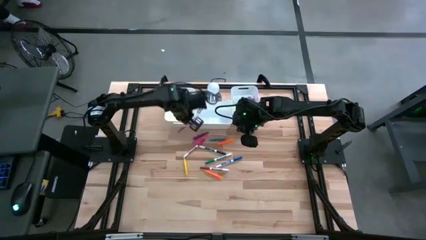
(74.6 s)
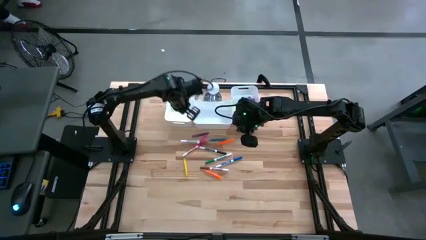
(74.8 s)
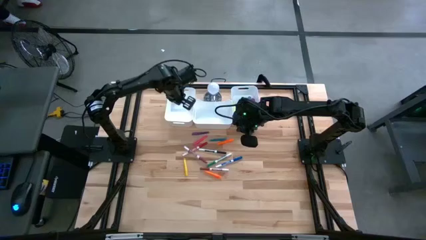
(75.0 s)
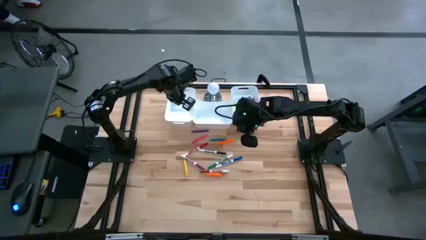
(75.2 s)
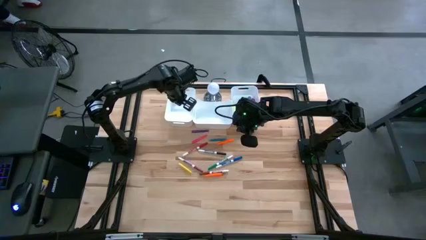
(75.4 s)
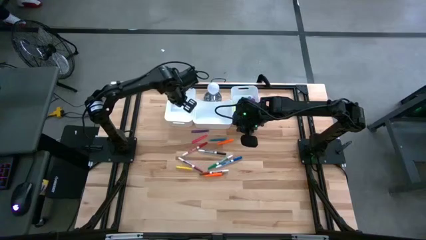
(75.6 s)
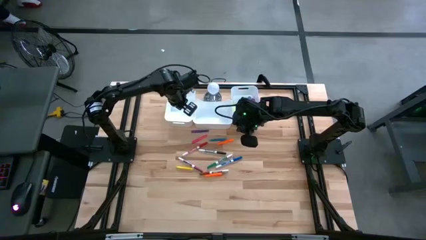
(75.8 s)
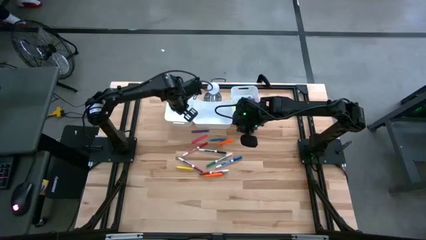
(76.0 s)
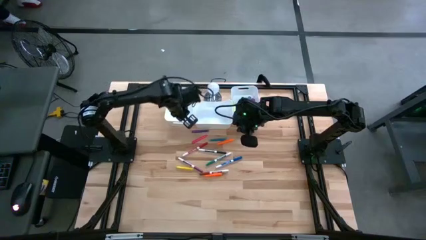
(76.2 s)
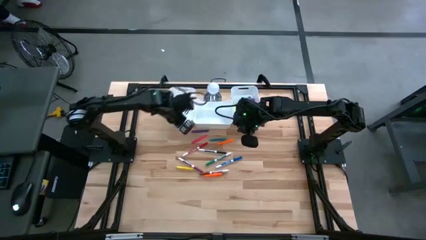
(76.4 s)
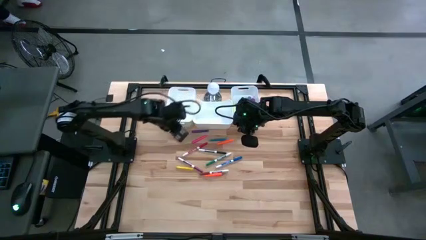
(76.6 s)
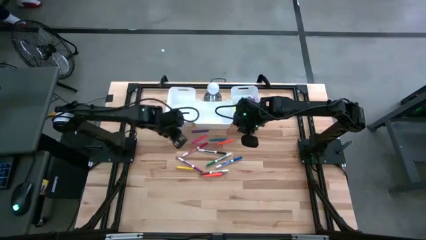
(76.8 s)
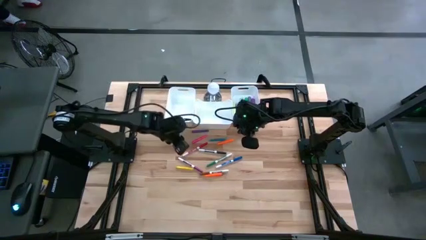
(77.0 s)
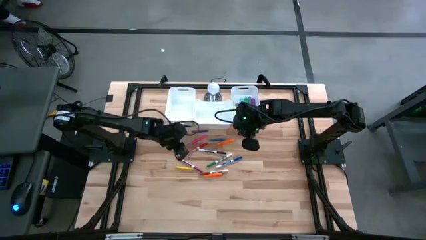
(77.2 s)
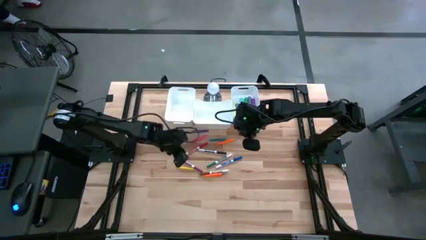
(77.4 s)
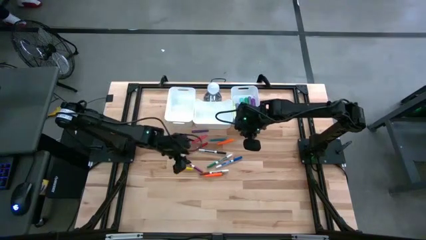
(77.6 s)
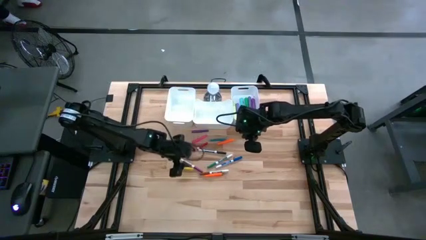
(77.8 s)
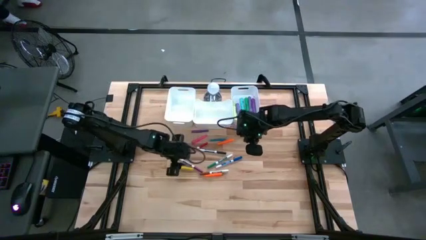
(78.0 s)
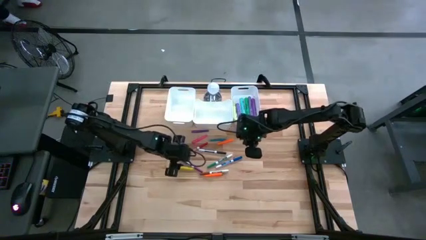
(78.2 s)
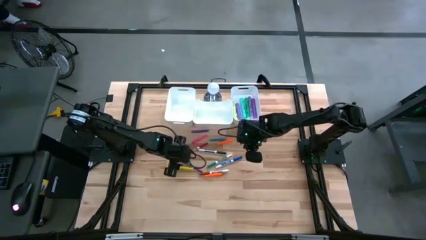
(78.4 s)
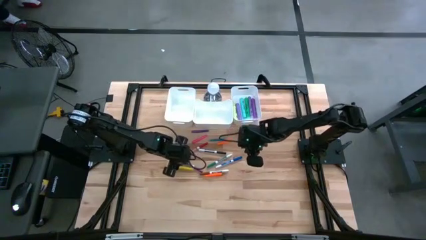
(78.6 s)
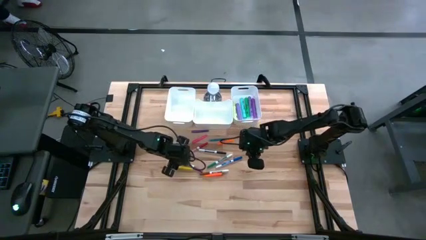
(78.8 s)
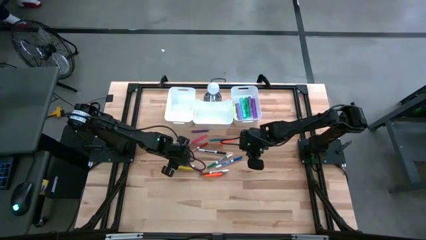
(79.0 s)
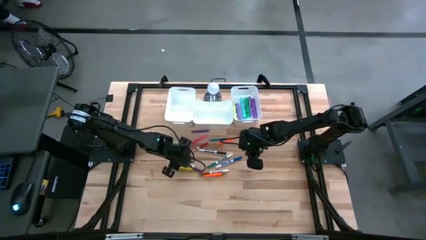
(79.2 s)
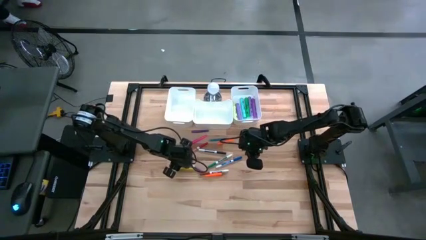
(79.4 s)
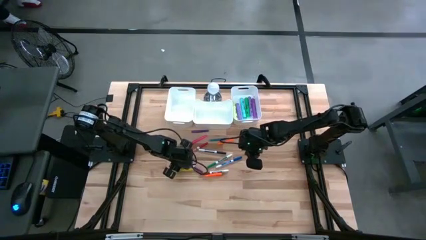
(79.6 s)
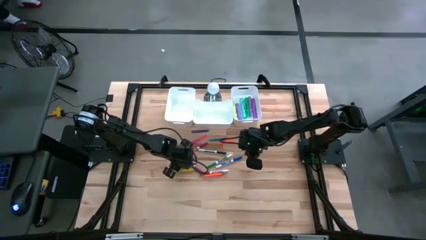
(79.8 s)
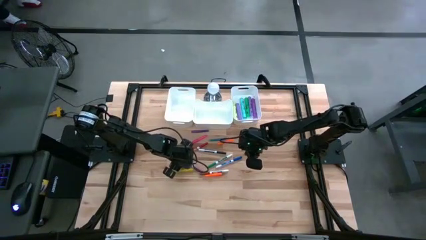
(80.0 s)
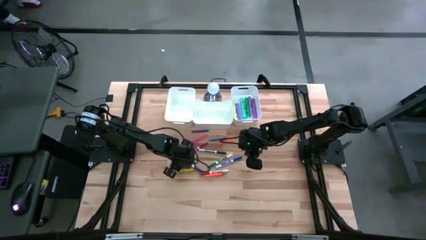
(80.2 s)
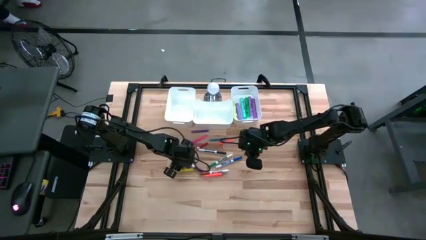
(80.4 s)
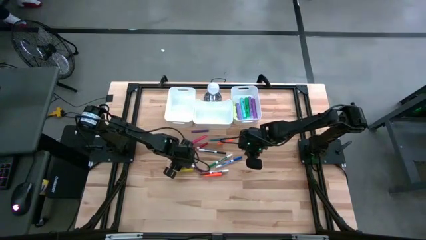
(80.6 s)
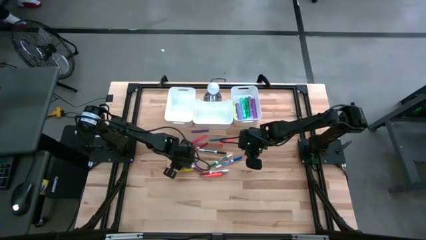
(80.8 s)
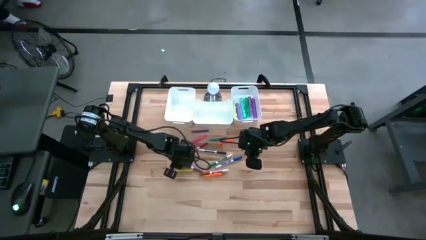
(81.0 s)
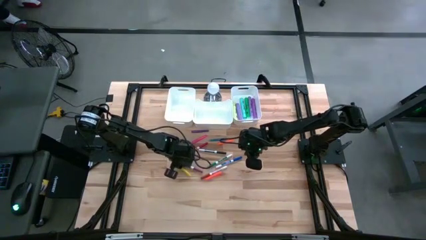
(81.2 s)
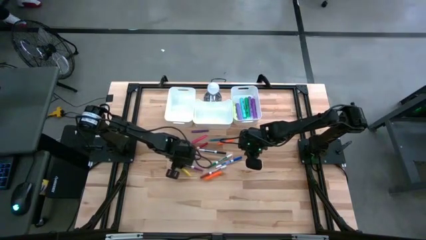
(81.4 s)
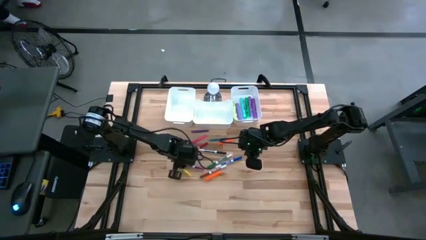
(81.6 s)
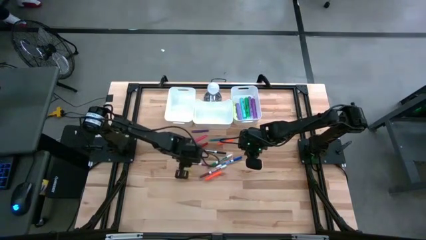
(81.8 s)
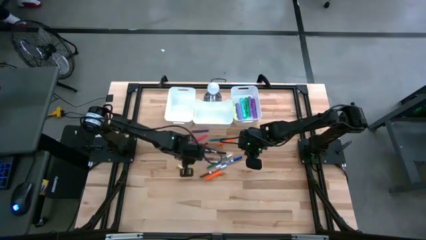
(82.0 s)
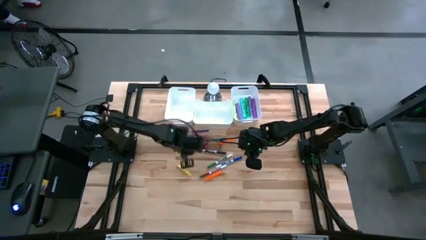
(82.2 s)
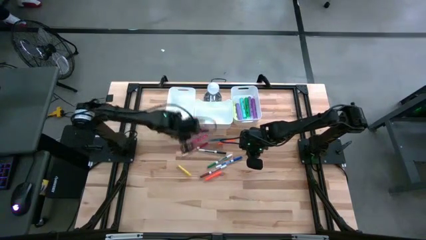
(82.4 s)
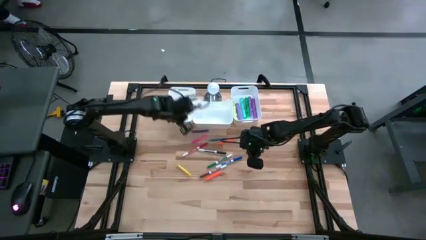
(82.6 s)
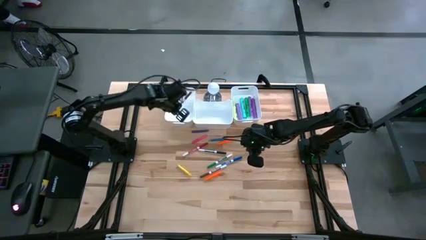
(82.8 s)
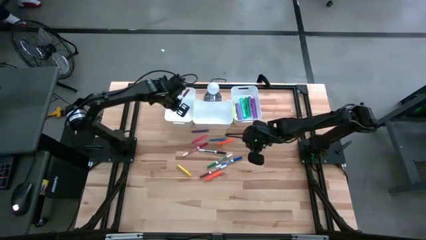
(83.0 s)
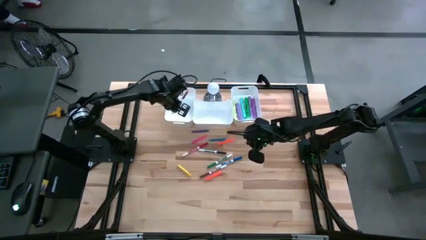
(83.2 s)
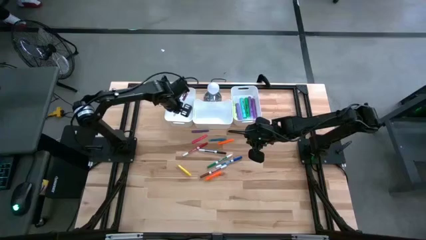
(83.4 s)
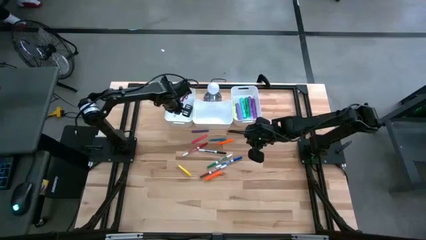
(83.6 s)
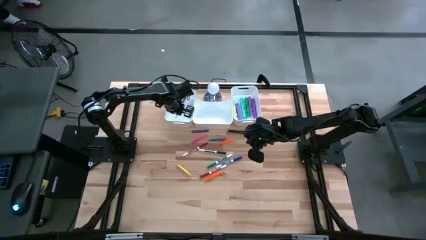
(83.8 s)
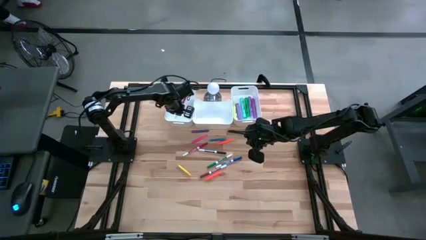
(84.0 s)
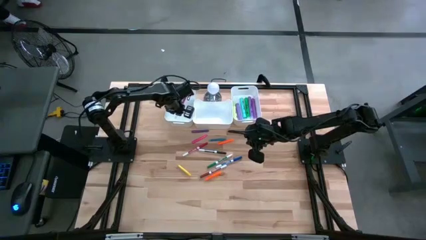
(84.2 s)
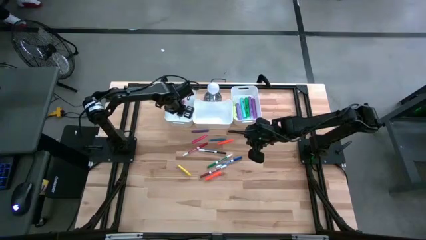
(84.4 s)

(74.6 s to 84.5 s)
Task: Pick & Place Markers
Put the violet marker pen into the left white bin

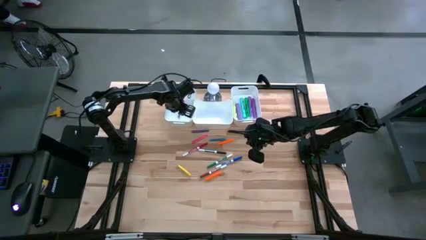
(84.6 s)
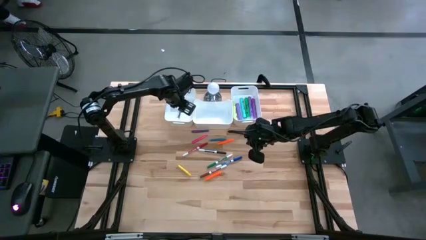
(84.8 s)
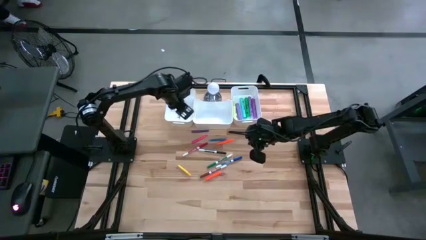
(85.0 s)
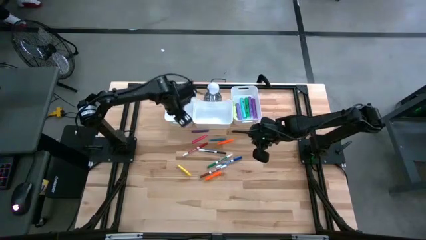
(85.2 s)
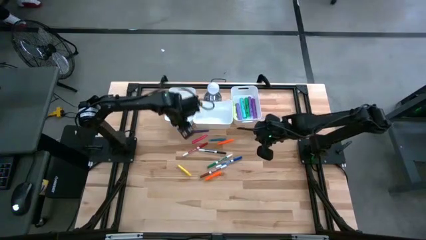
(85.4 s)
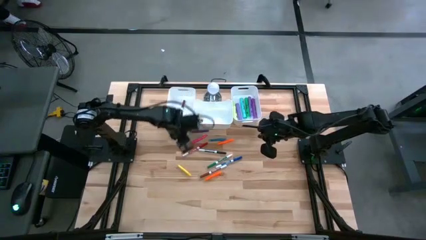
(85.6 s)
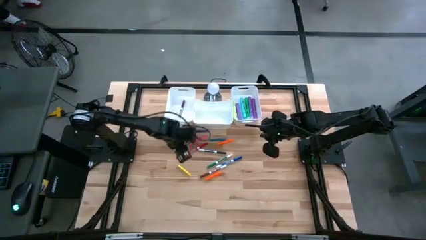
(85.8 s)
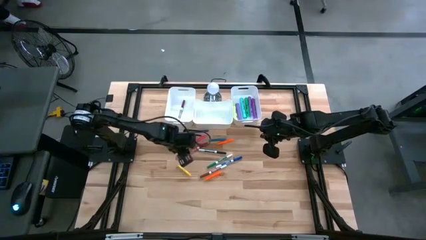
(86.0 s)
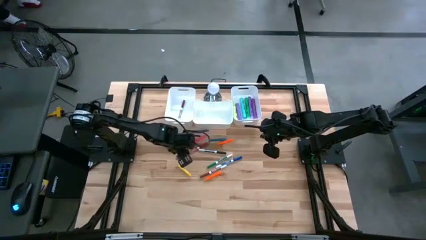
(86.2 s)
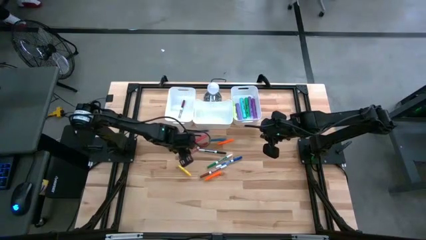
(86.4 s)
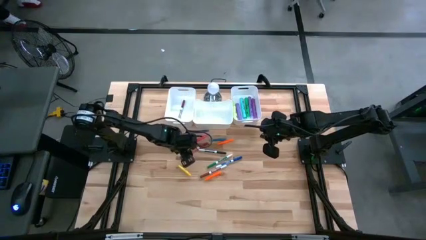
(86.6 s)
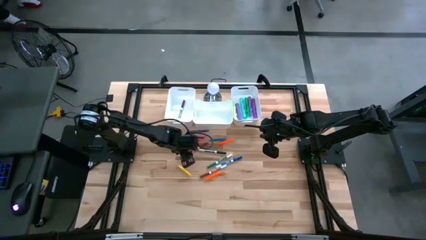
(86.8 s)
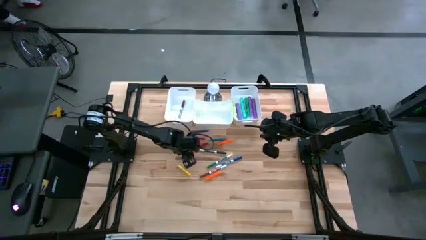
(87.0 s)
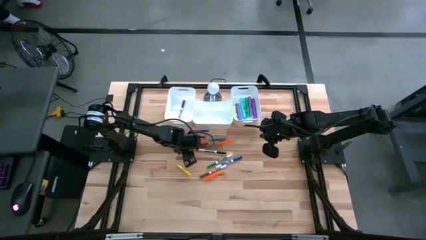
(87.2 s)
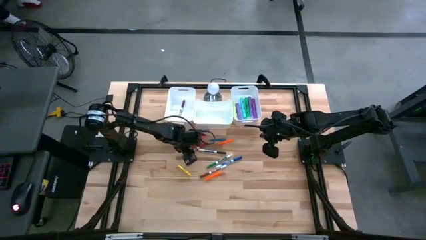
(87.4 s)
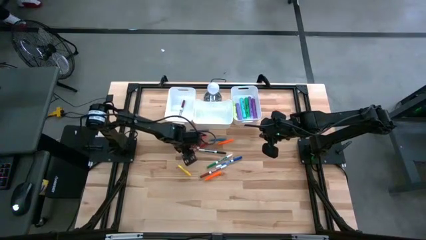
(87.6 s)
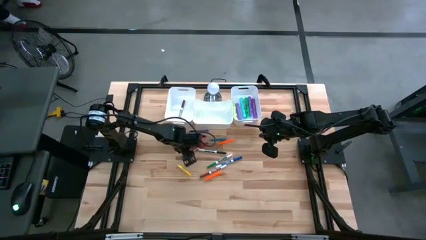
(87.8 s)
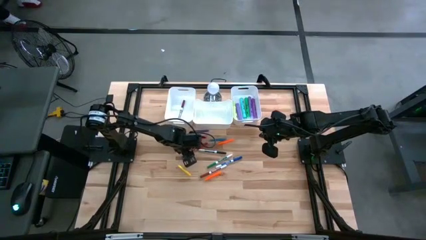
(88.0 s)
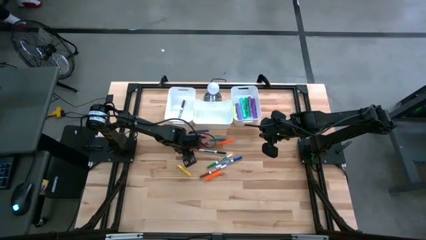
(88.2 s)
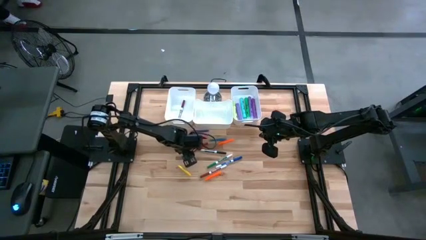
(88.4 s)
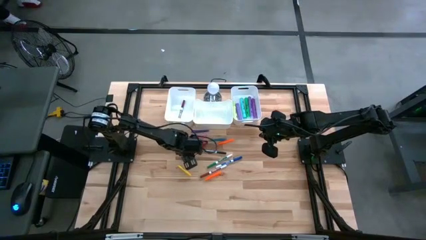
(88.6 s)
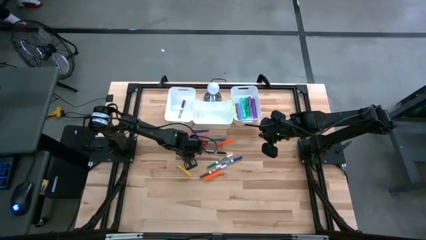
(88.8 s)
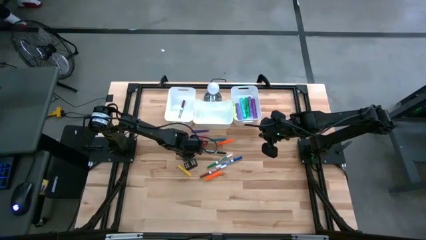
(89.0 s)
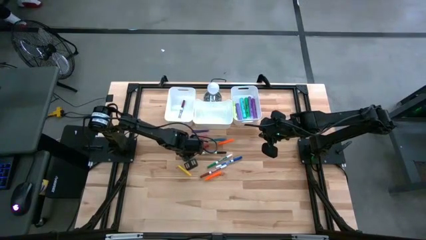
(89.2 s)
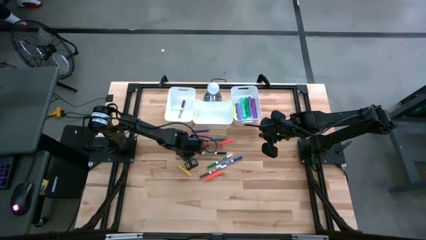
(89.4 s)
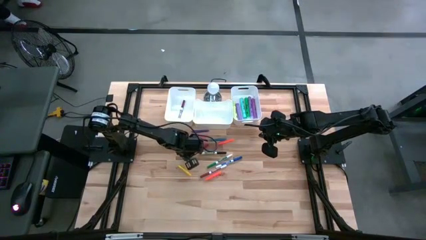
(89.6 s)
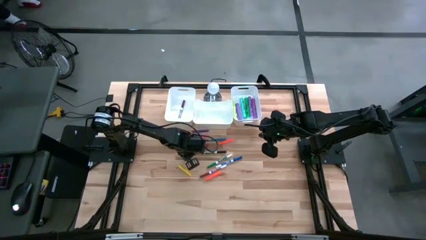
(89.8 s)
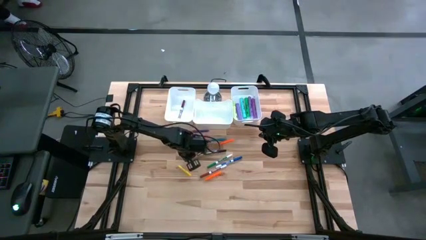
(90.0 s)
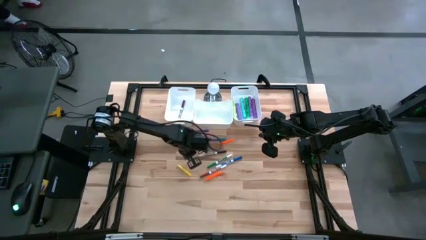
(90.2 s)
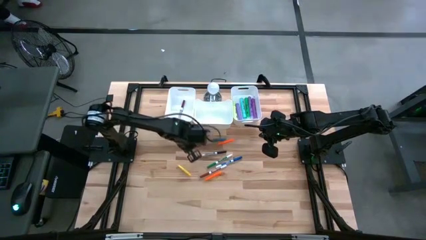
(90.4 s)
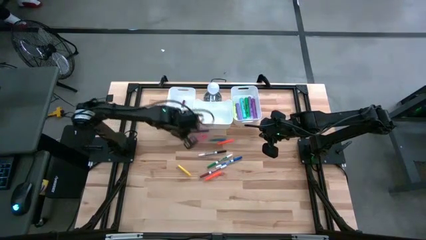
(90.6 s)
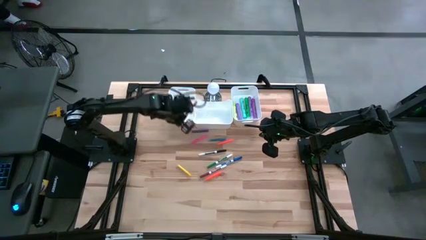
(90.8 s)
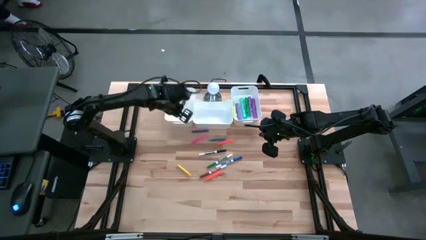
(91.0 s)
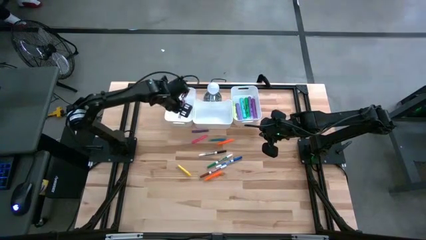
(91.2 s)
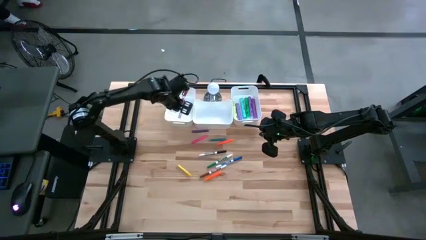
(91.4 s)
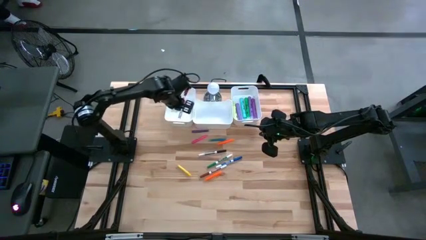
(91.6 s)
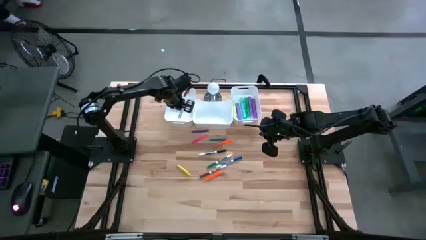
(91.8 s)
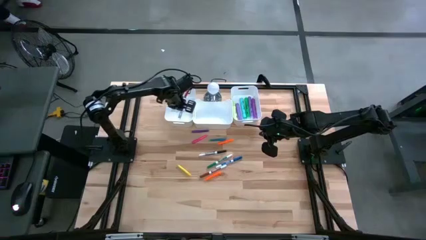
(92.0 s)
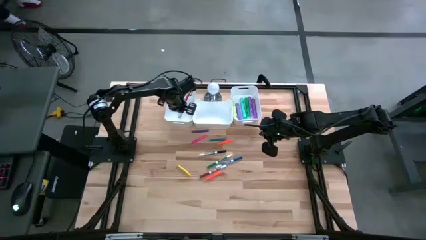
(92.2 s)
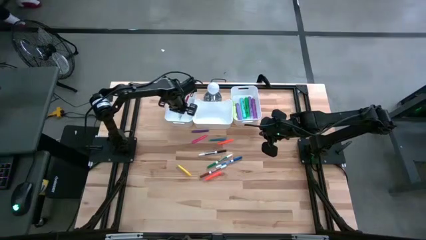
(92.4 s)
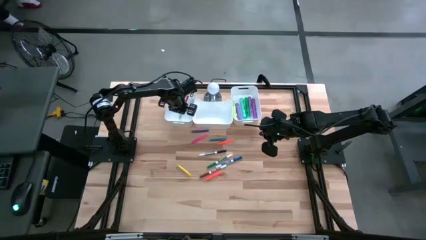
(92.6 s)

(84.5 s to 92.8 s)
Put the red marker pen into the left white bin
